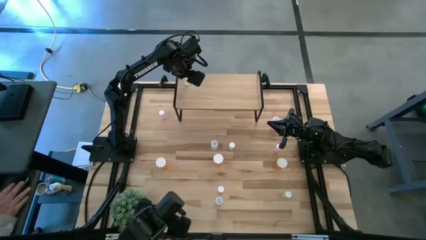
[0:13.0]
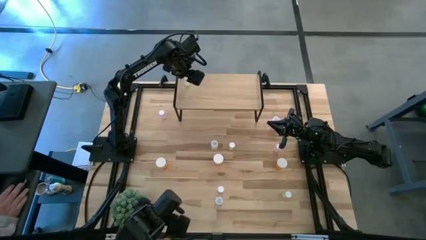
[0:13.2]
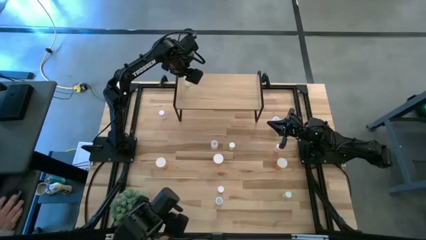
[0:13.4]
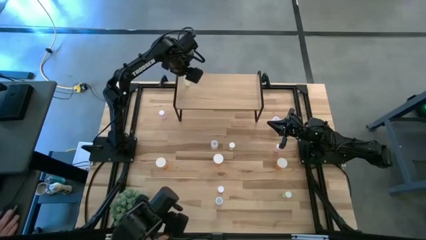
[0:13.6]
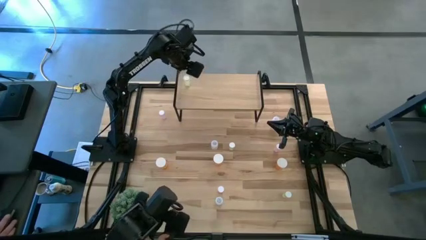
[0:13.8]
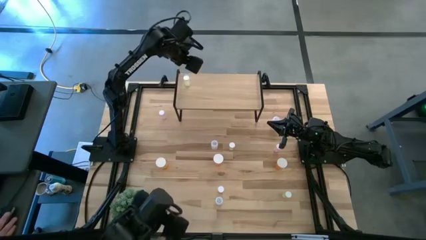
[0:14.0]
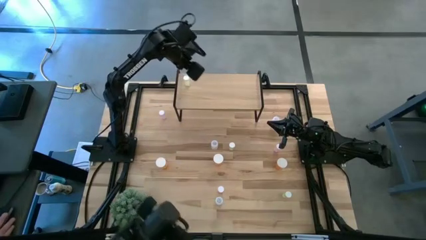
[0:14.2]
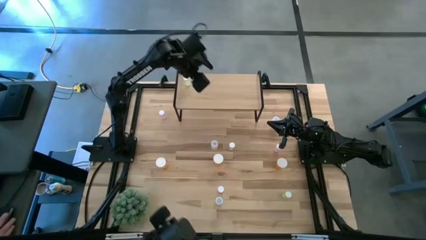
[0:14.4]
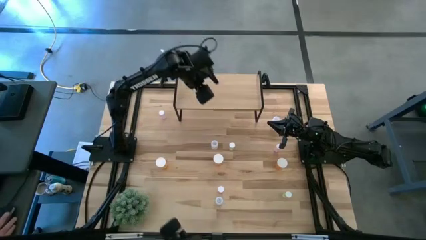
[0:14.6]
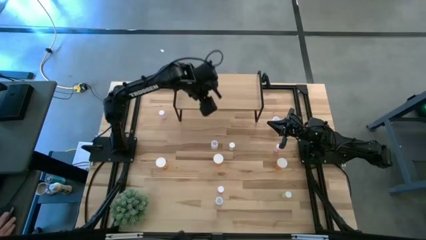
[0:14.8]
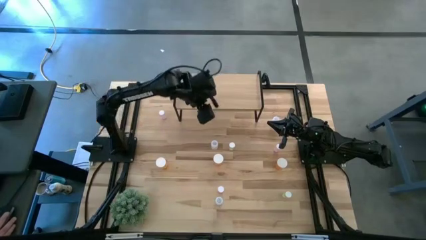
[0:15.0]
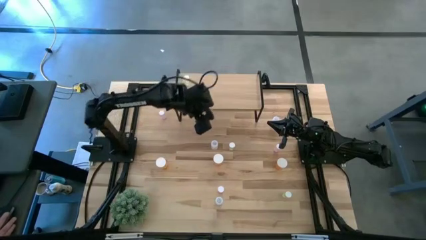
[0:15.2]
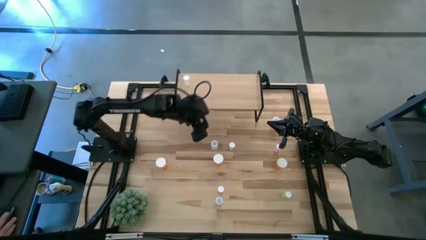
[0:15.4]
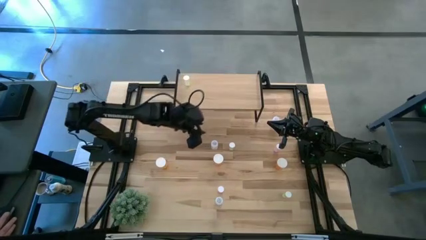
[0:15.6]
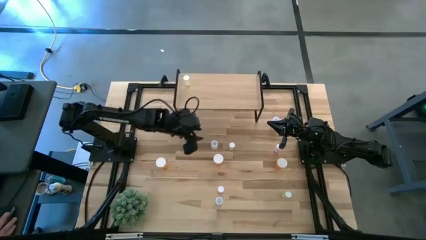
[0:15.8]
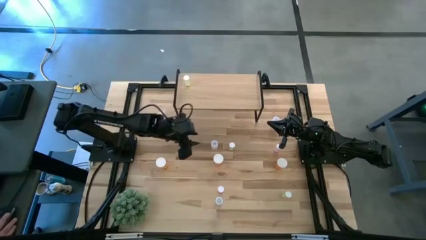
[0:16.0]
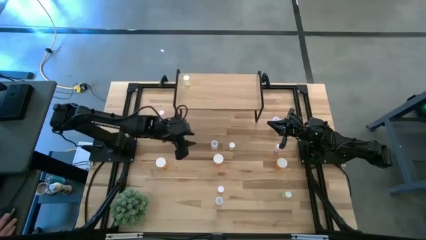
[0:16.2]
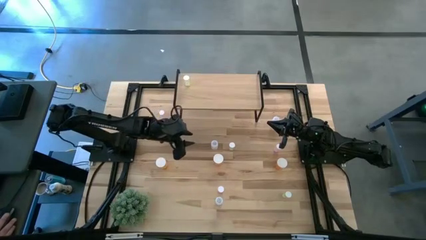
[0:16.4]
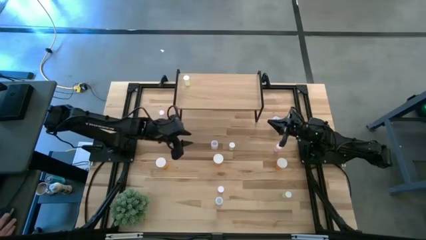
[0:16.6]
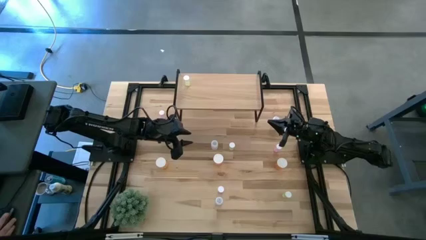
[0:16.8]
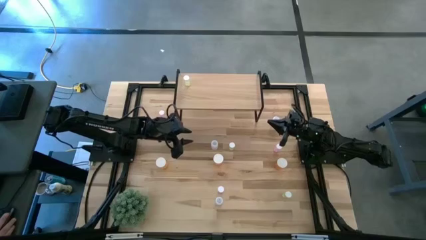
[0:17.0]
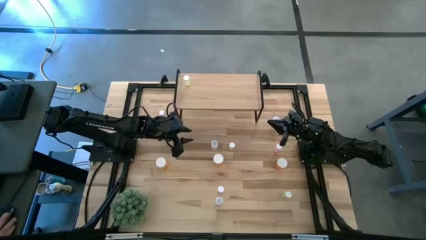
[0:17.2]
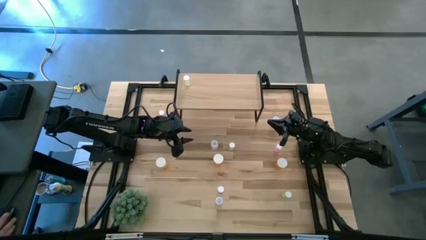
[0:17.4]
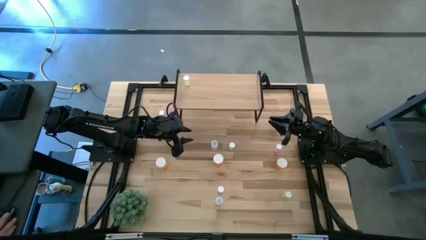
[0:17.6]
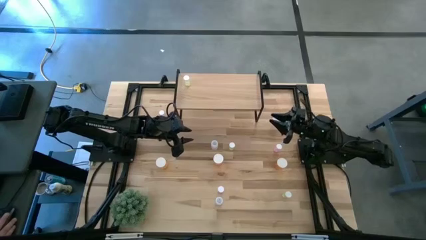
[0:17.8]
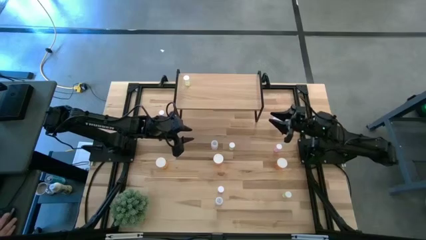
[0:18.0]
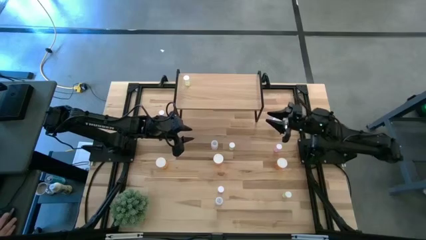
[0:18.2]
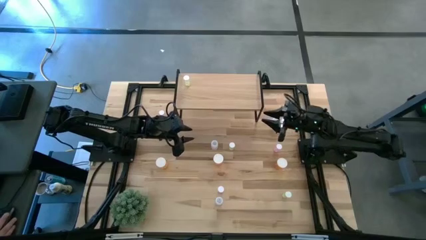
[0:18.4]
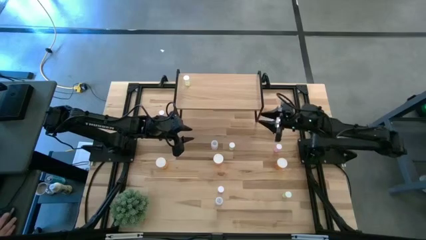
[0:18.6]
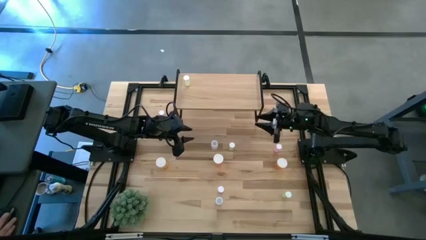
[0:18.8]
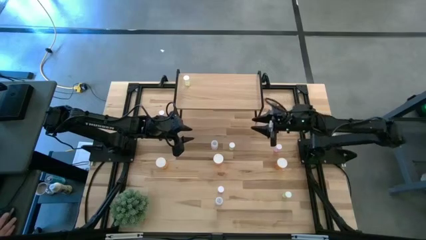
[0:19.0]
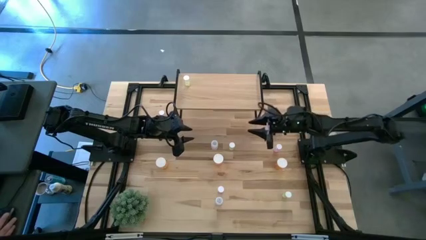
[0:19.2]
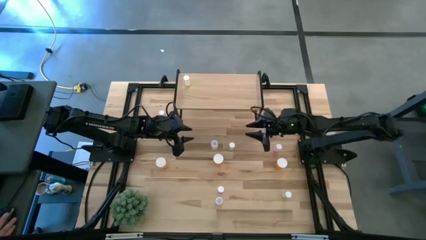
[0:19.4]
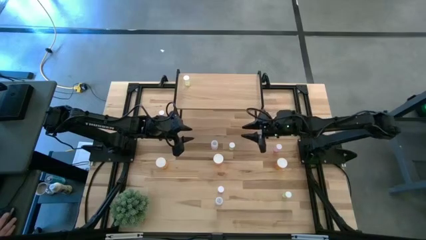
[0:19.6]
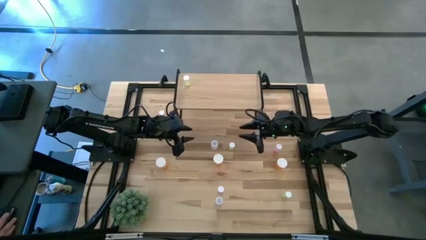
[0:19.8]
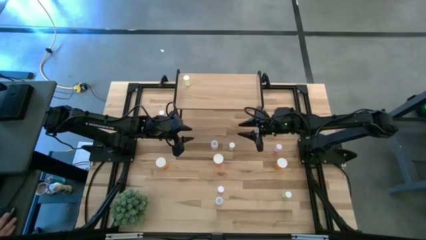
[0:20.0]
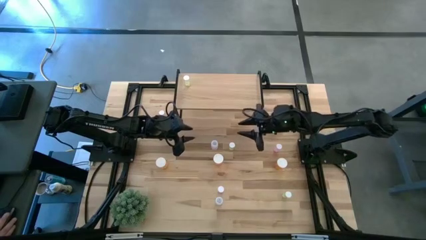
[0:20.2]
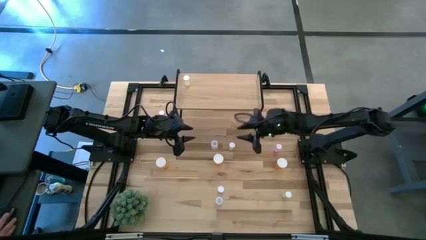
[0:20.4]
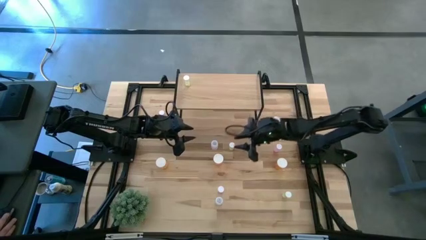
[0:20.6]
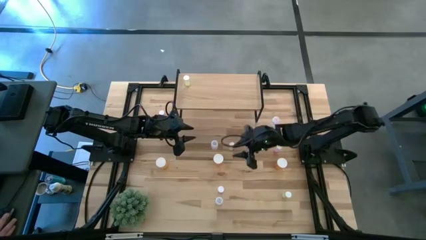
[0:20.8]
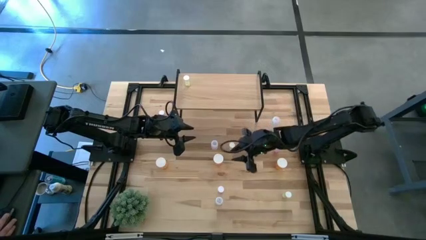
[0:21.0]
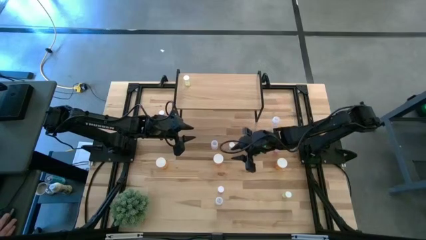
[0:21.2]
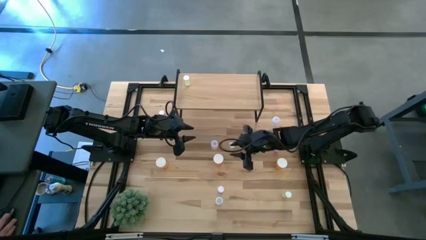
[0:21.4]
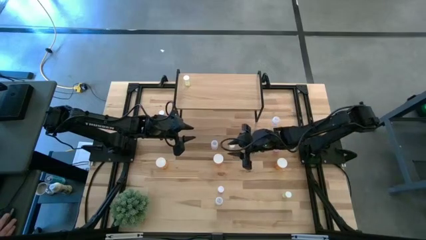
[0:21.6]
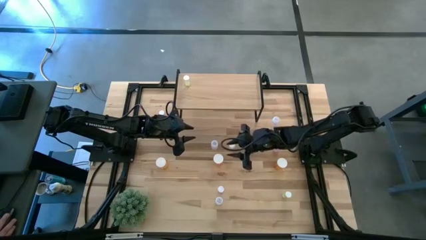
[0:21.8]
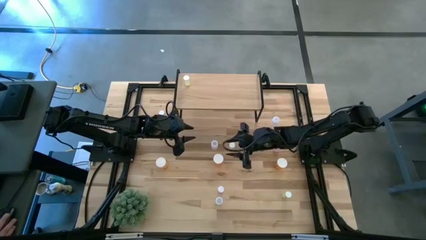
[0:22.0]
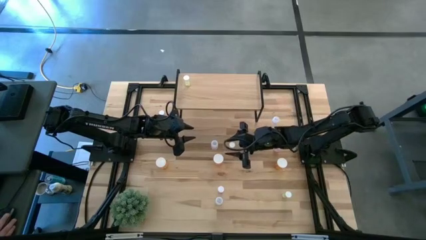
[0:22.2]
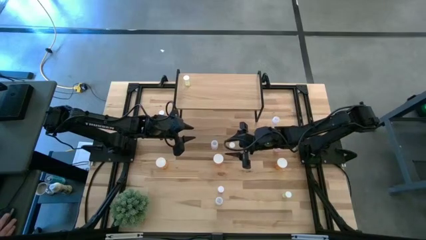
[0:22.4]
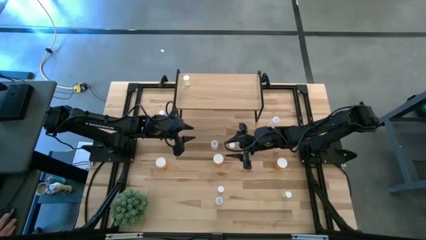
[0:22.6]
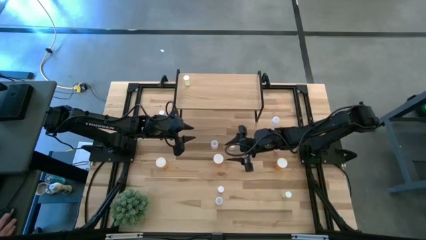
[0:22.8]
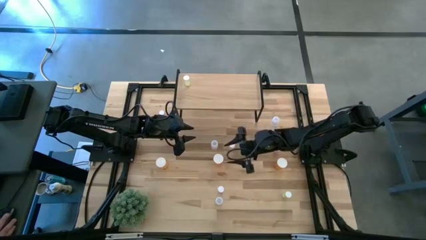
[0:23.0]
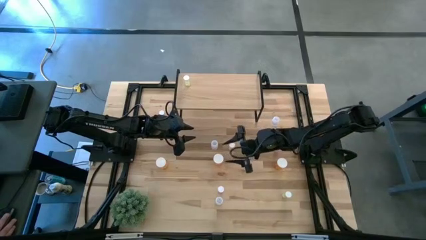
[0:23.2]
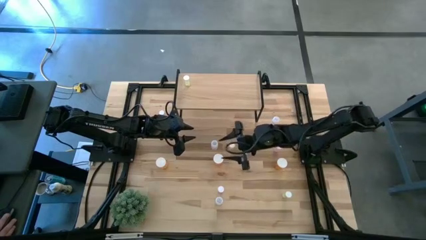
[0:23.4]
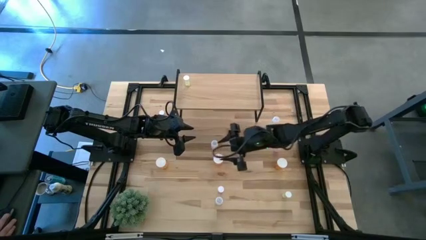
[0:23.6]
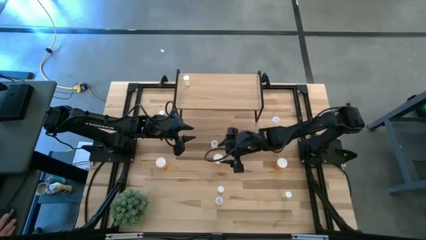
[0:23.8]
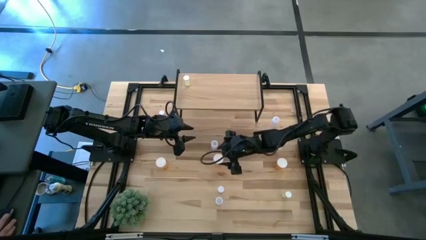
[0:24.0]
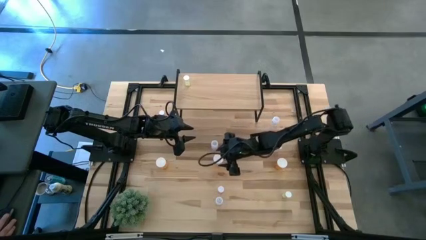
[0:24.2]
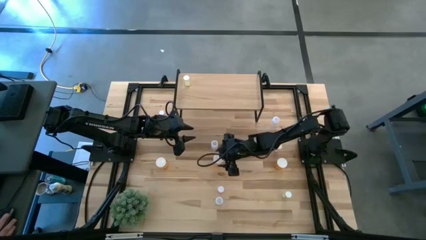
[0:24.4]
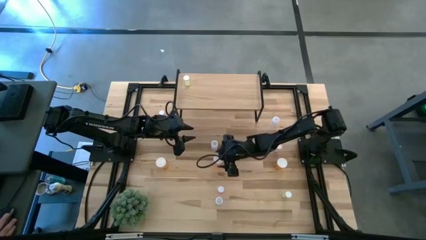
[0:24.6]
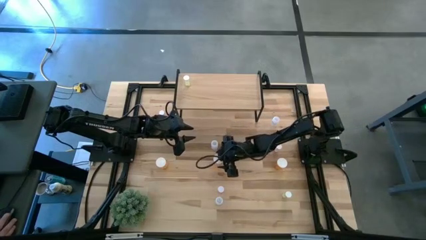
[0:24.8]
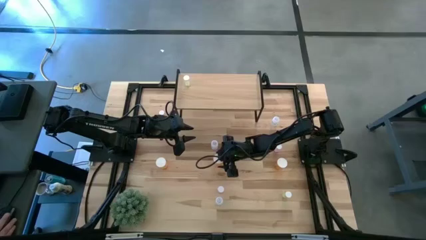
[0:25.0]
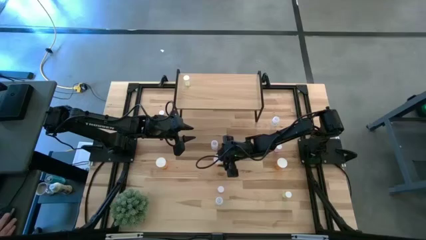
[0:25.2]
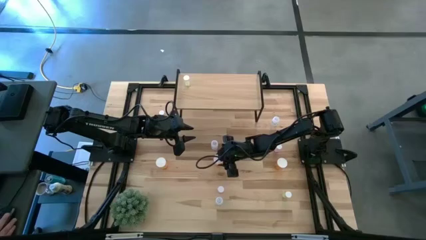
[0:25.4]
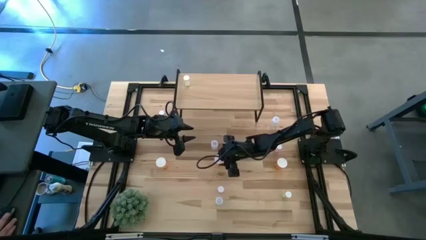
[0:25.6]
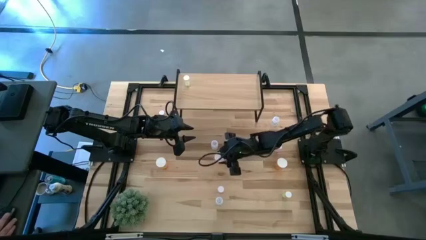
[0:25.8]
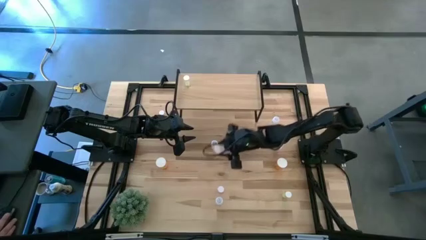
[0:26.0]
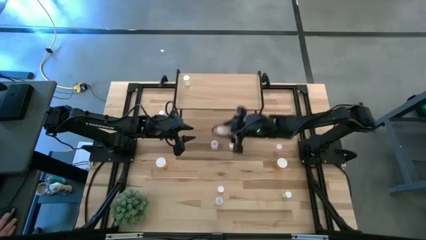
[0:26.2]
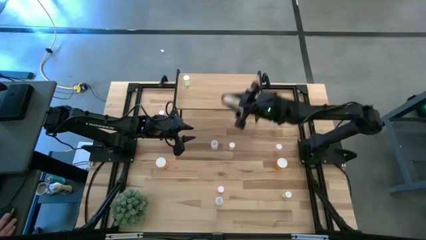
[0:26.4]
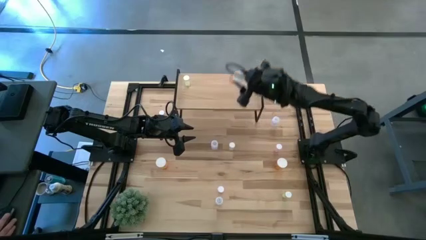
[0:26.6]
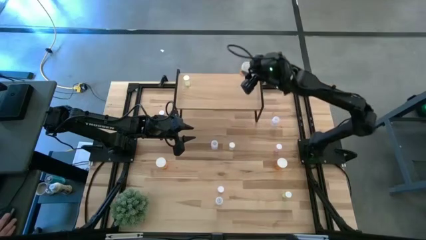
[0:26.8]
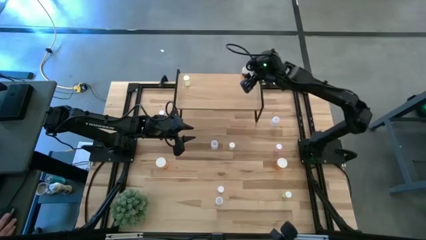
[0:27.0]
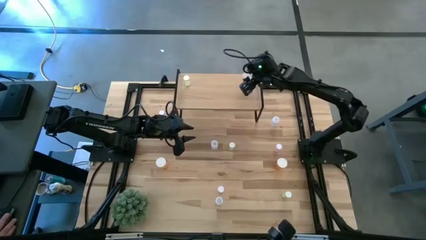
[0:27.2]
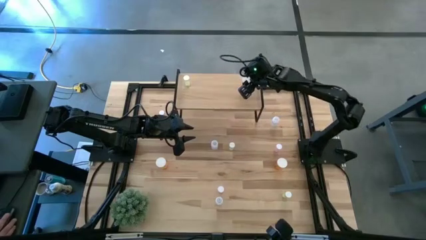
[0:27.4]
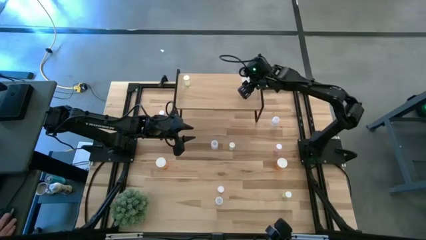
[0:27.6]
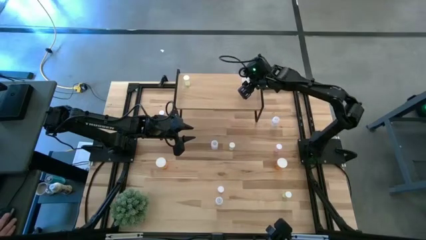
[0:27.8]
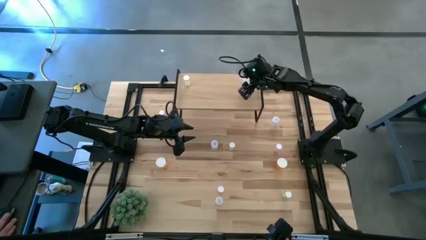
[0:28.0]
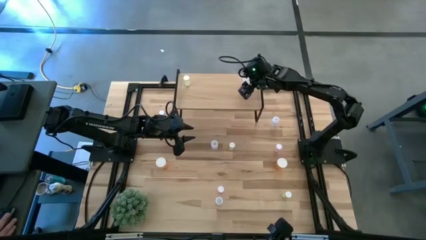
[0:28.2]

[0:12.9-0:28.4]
Task: Pick and place medicine bottles onto shelf by color
Put the middle orange pill bottle on the shelf

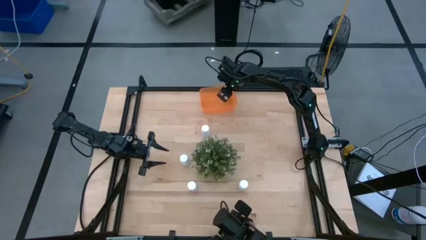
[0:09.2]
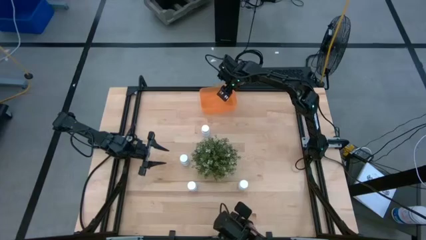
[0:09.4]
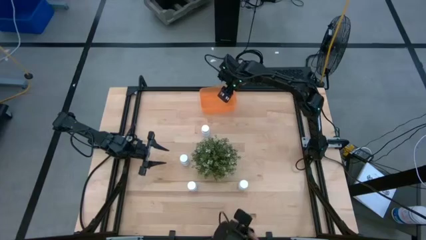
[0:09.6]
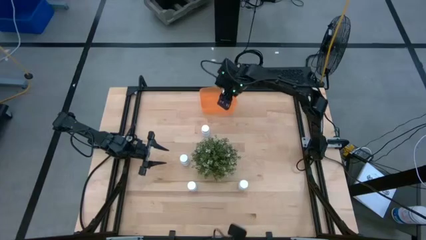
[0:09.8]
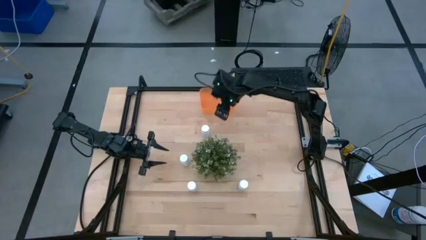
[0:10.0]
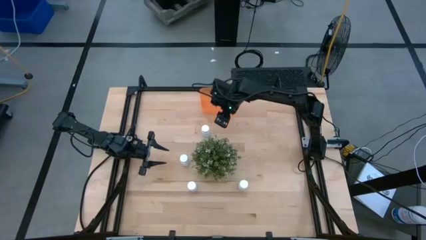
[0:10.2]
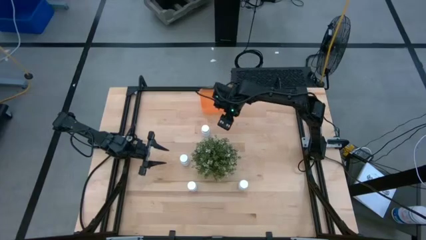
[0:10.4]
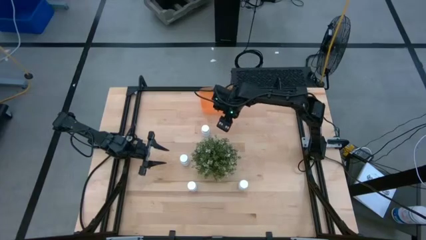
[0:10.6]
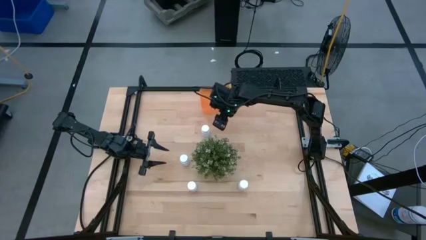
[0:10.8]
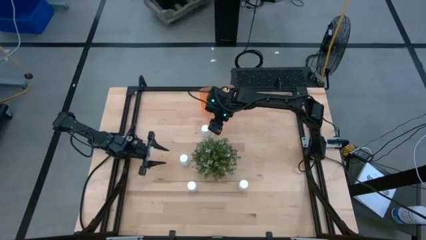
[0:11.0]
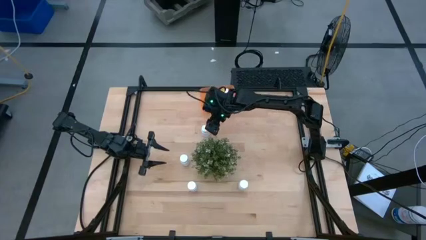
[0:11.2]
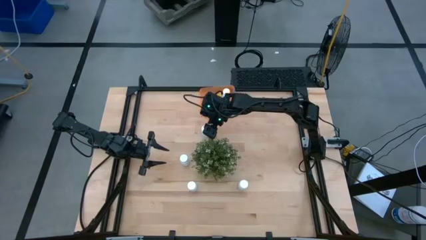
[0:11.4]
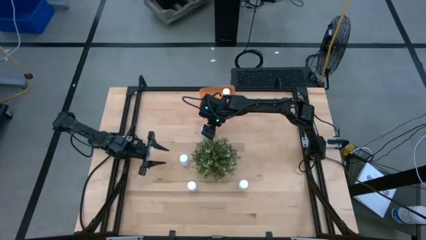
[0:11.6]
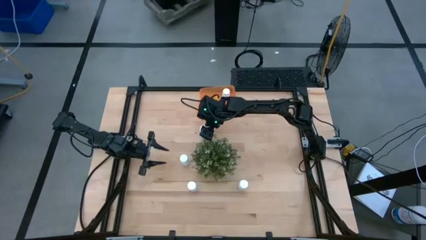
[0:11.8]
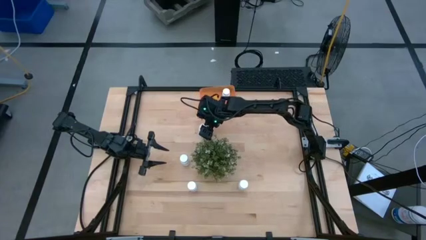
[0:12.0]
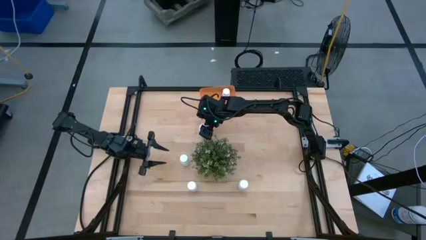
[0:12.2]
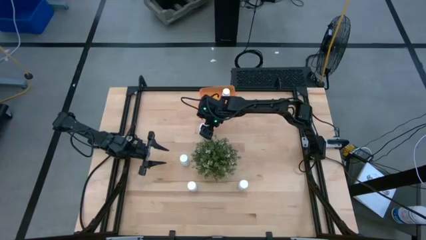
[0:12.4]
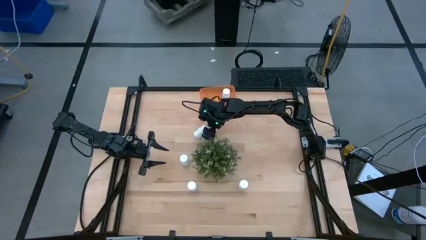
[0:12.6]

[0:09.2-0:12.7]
Task: Pick and place pill bottles into a basket
Put the white pill bottle into the orange bin
